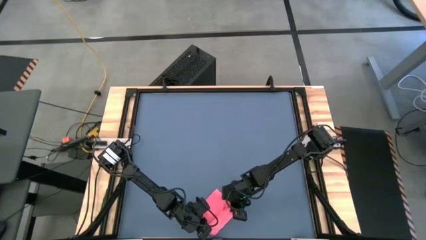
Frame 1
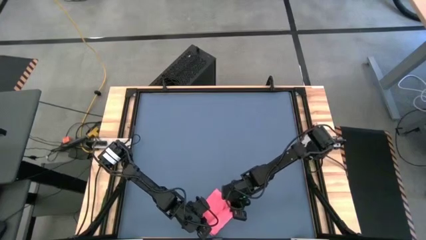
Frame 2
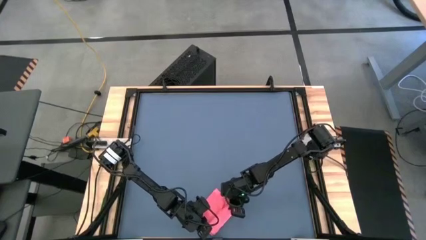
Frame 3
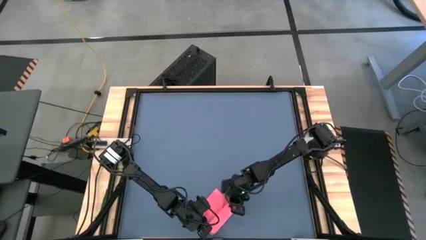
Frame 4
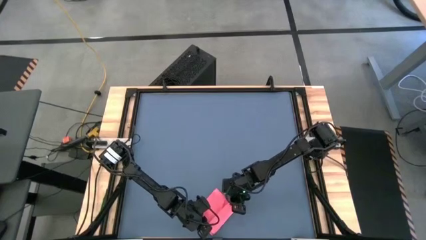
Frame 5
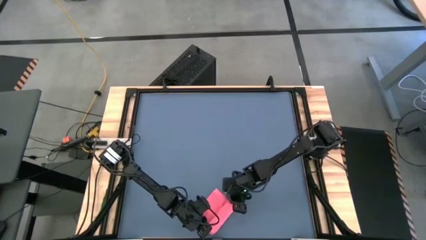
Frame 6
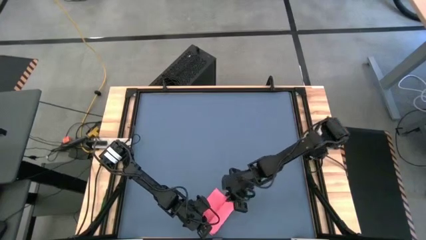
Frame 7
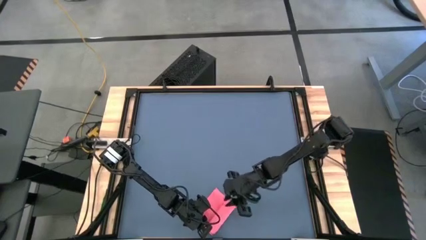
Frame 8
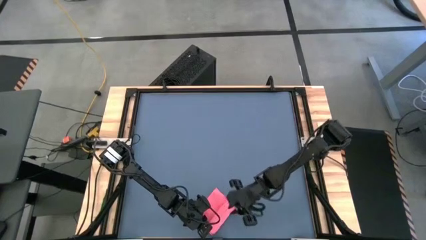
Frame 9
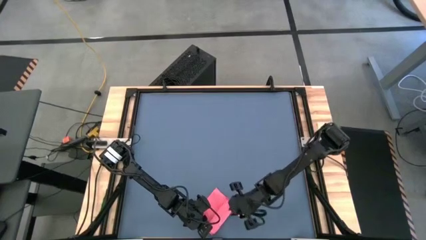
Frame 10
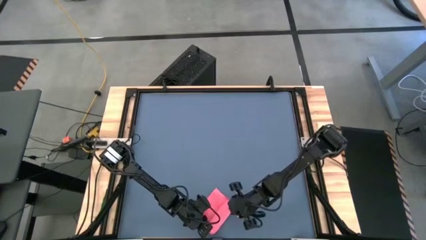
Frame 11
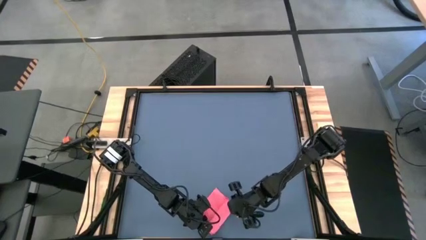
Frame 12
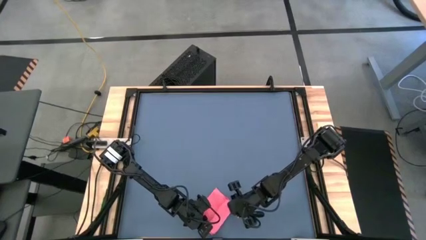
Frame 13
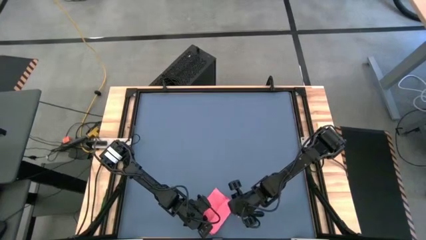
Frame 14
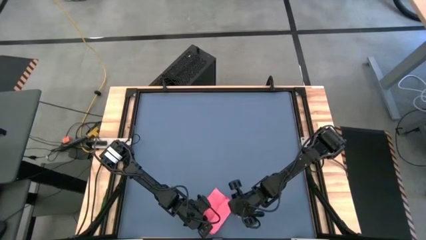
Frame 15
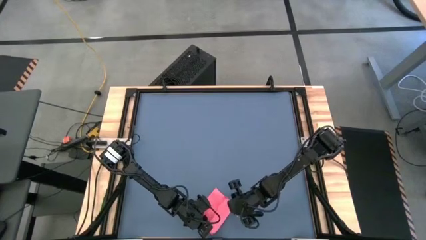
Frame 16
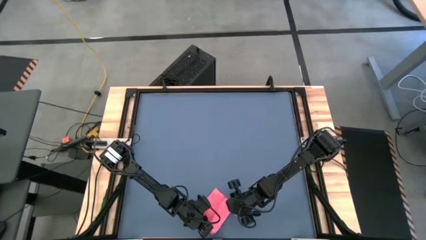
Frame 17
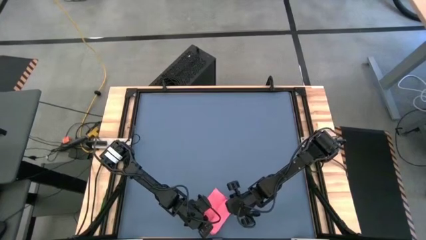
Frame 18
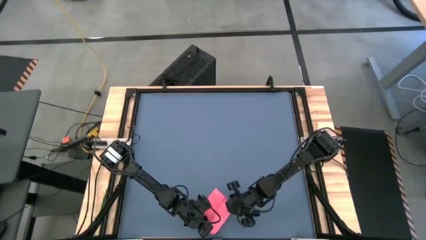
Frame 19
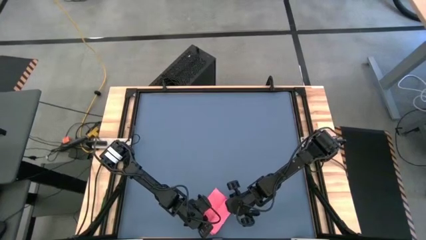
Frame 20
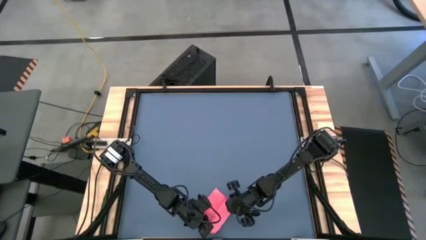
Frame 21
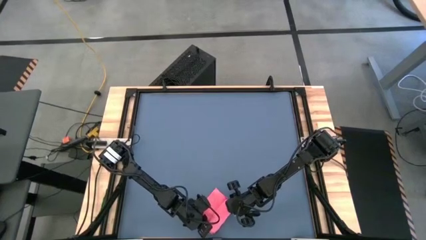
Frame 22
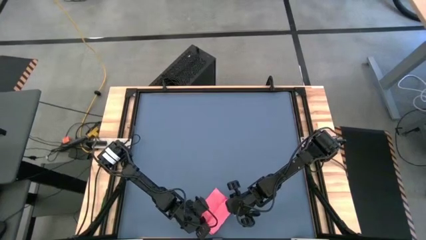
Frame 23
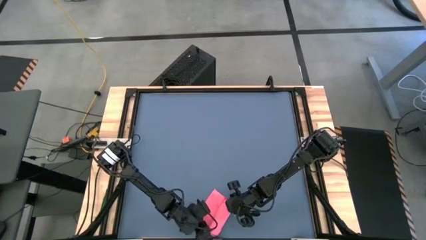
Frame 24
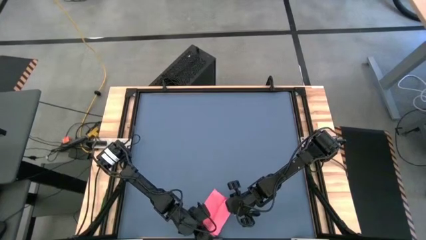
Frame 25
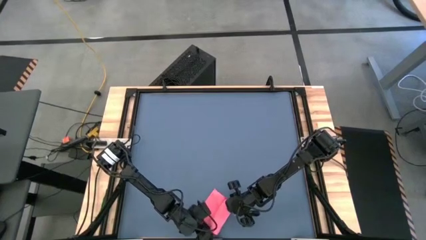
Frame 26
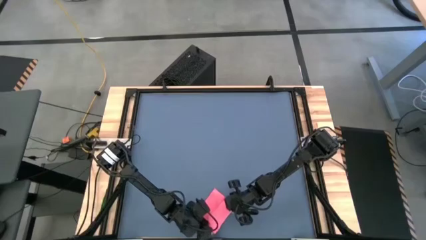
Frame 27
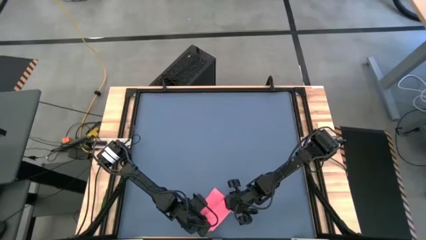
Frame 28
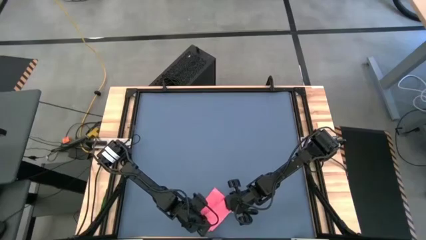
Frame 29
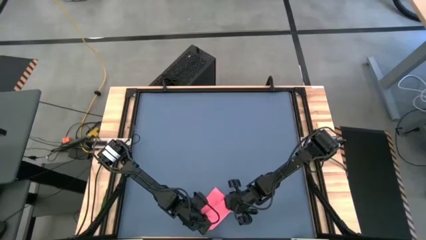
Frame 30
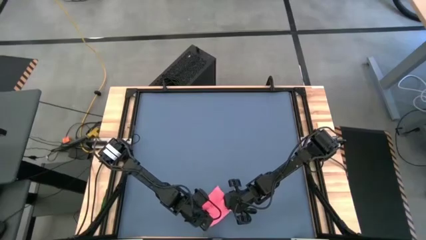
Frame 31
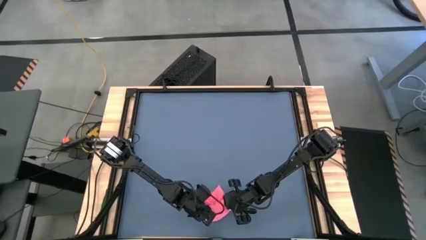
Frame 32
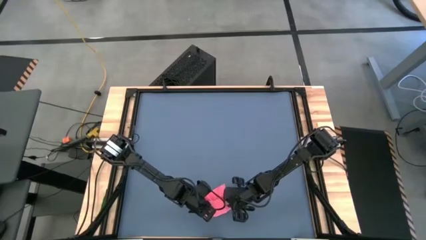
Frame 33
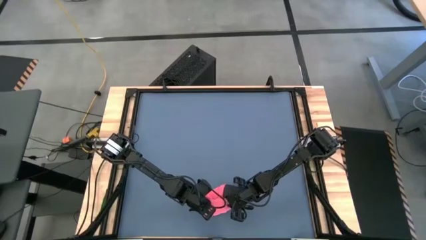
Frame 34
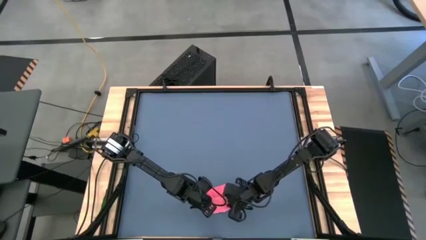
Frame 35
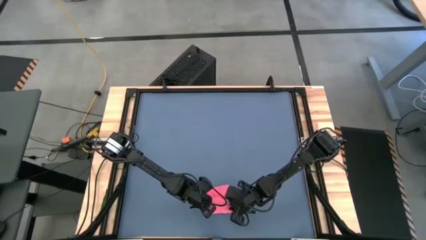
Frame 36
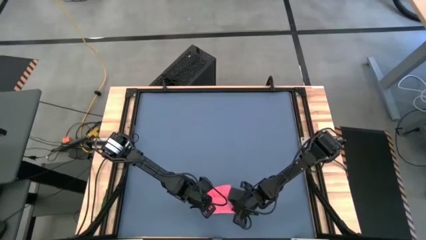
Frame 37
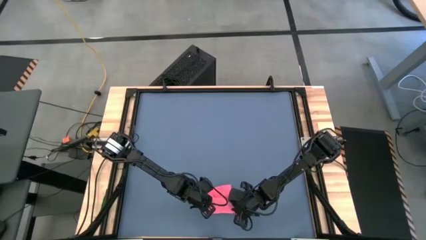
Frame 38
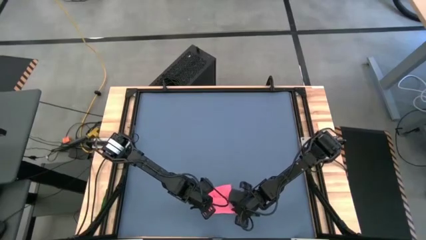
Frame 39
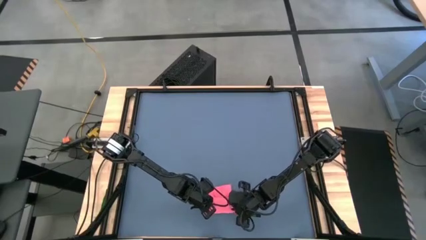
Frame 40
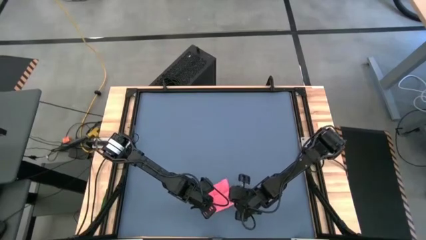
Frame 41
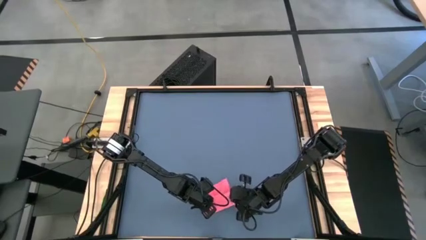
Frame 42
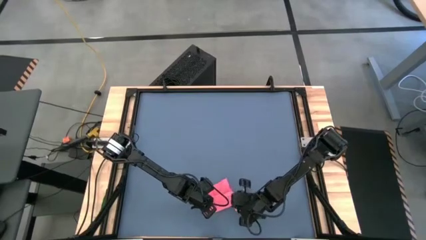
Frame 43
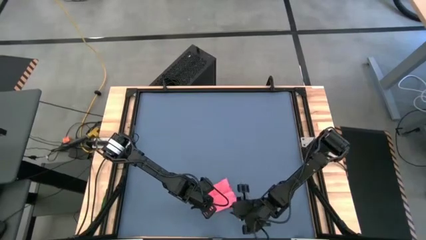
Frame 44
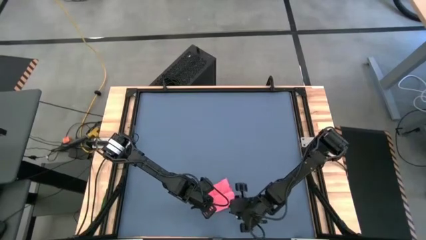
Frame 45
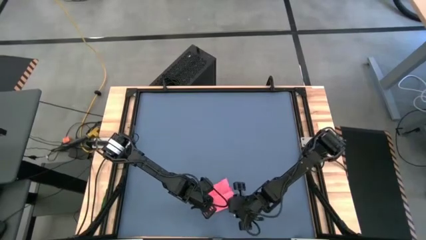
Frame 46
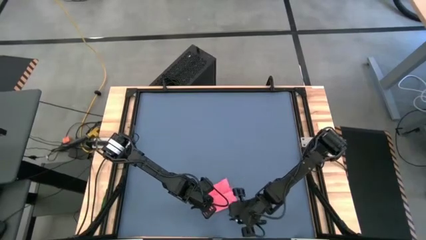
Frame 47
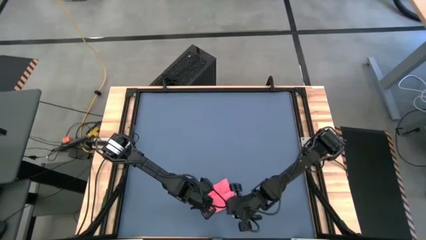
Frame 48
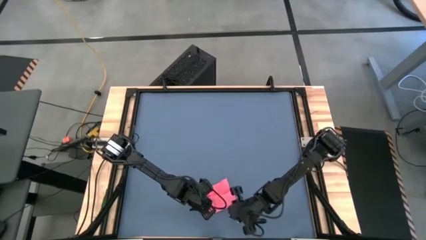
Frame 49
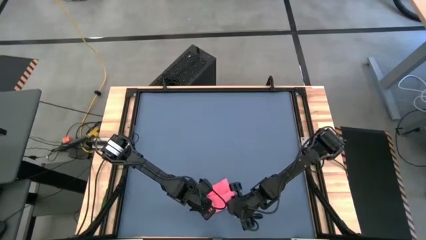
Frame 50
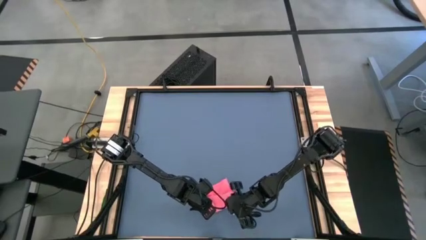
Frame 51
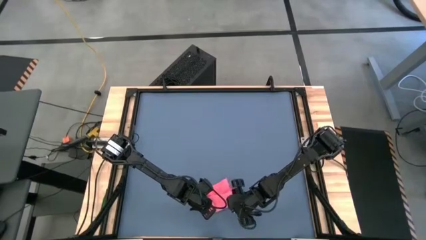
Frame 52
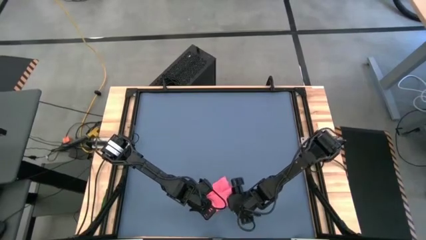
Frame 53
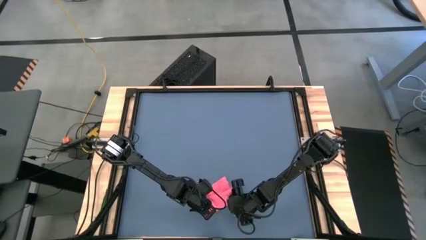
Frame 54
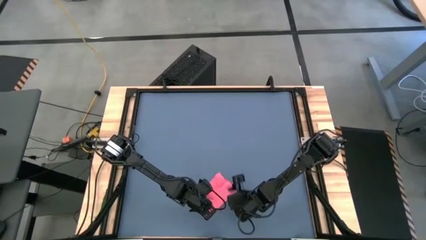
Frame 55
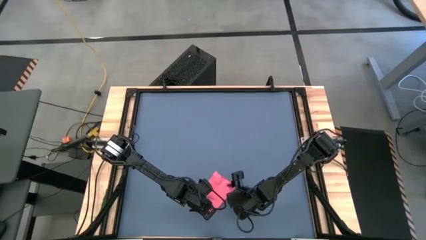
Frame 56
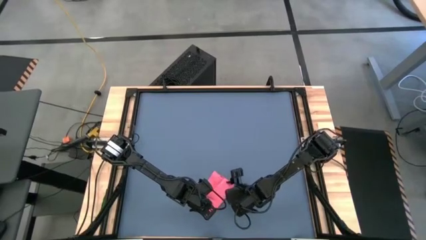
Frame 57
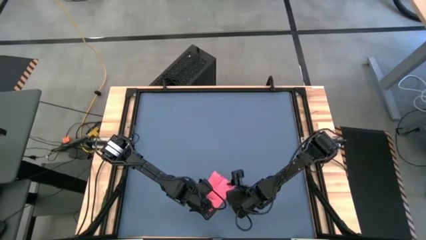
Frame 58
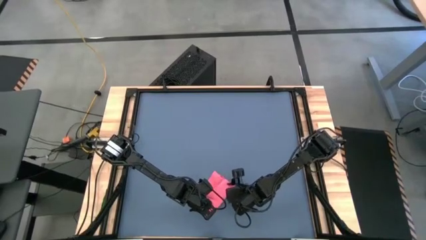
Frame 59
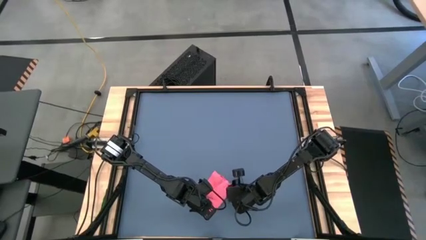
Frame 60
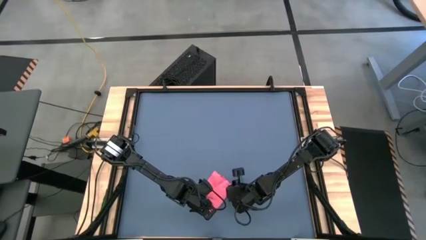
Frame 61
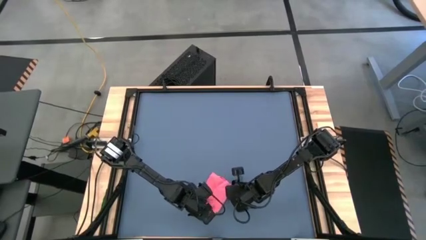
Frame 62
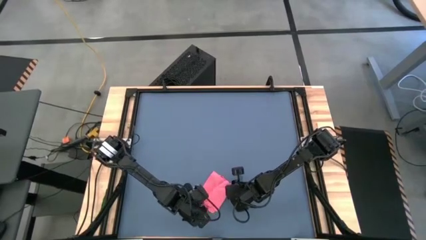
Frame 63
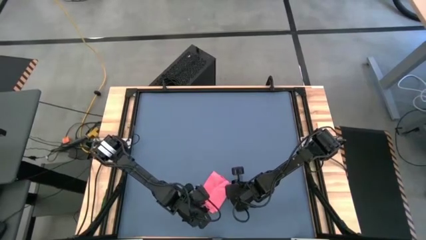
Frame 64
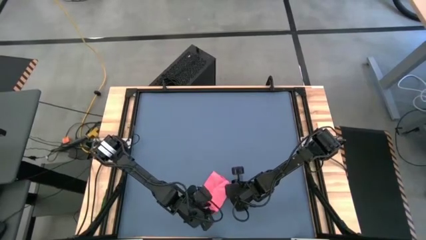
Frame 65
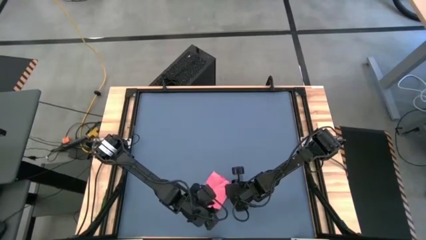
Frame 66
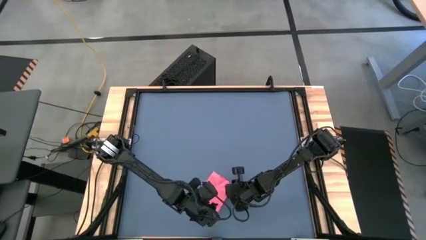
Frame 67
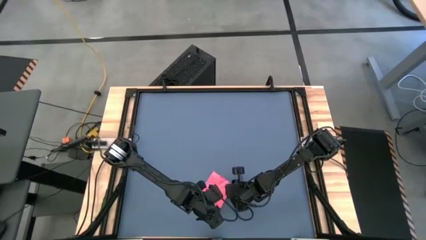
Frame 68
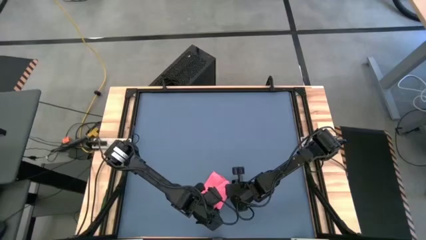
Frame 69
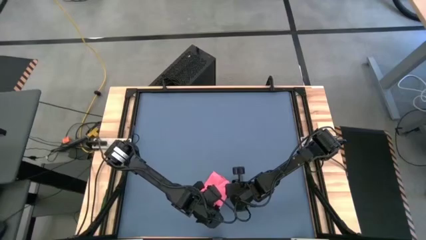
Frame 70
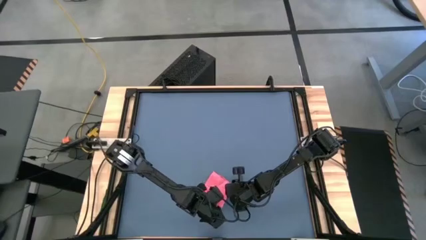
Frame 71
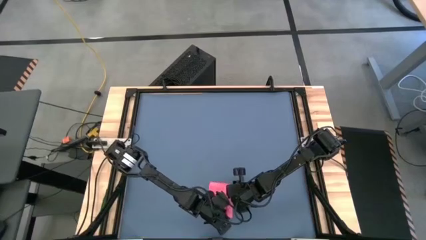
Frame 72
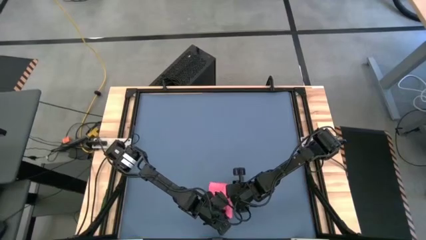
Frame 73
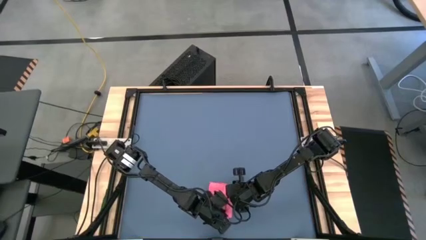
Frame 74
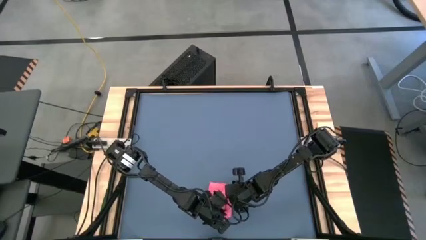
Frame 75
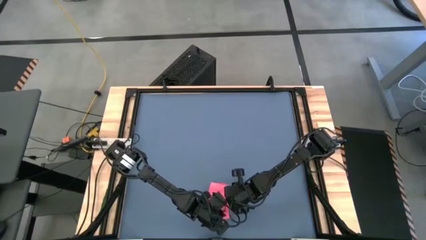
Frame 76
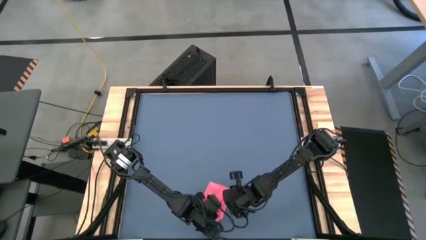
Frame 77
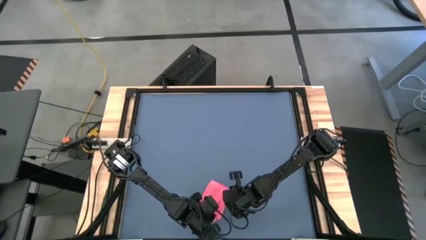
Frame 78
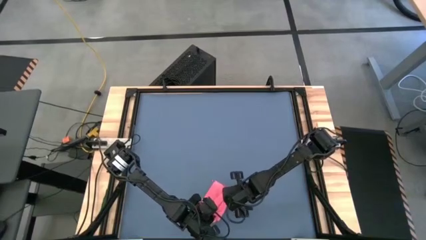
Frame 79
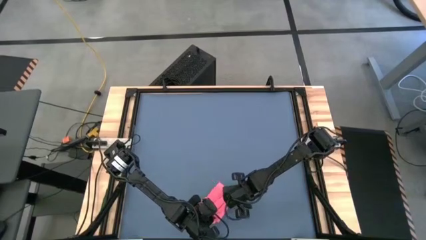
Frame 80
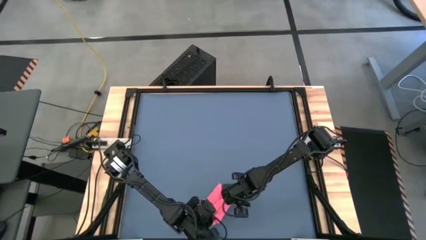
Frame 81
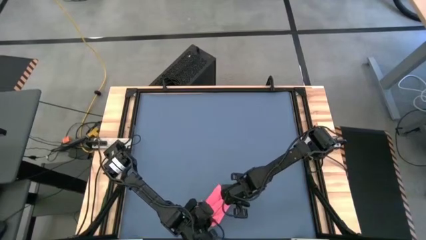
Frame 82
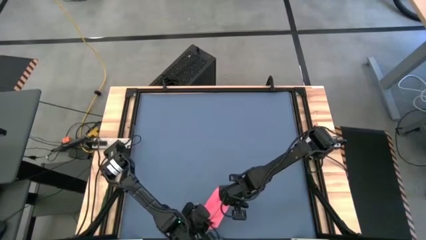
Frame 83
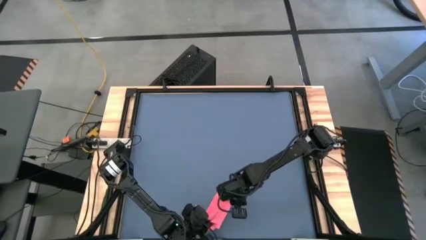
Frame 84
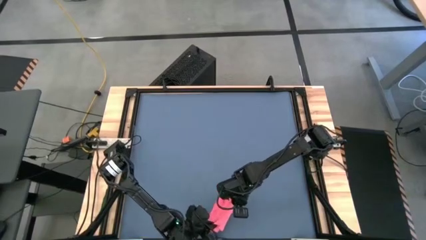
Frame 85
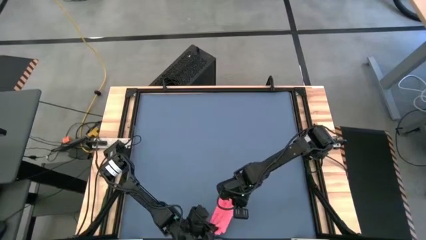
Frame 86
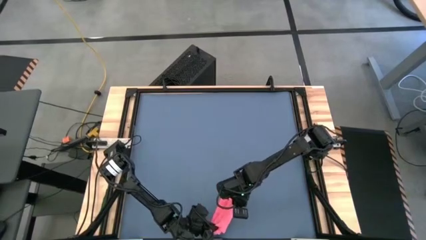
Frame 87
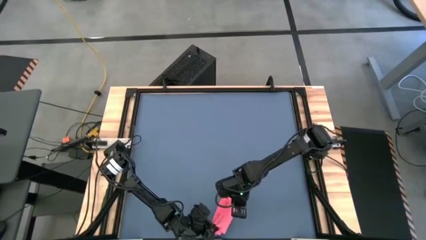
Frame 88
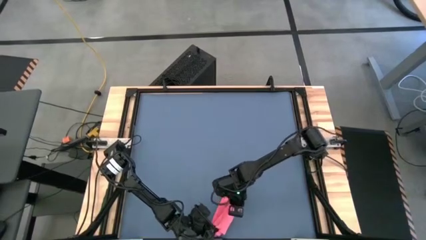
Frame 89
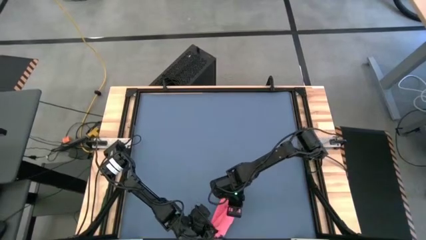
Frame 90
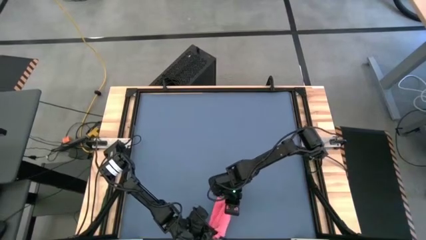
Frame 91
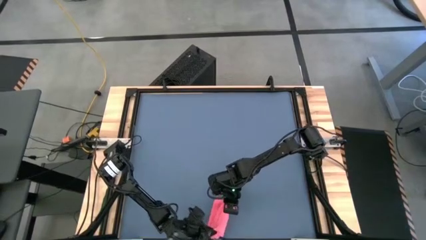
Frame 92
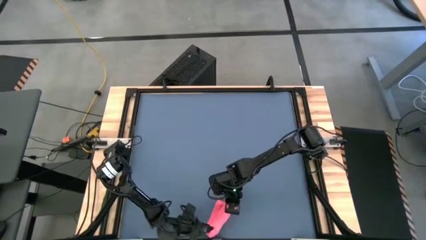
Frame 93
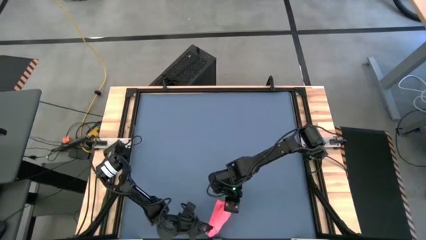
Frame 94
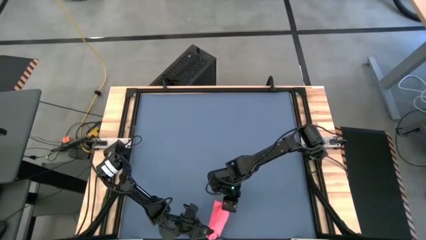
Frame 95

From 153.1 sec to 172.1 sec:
Task: Roll towel
Roll the pink towel
